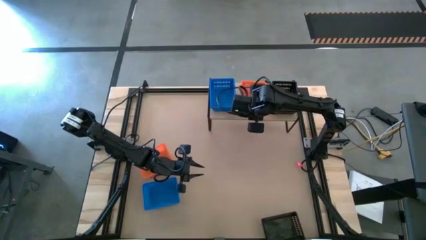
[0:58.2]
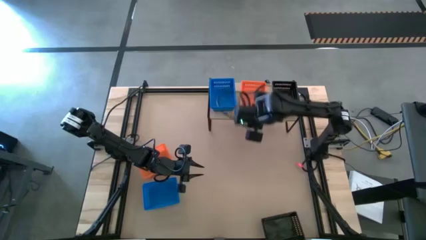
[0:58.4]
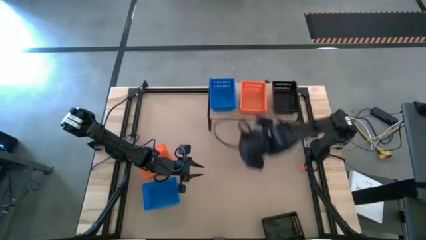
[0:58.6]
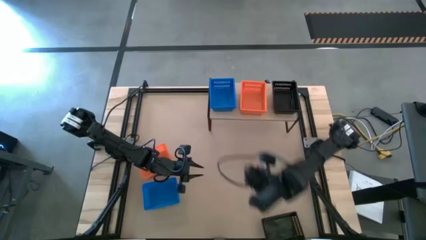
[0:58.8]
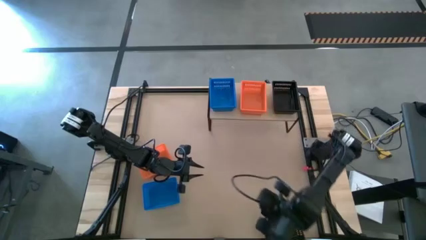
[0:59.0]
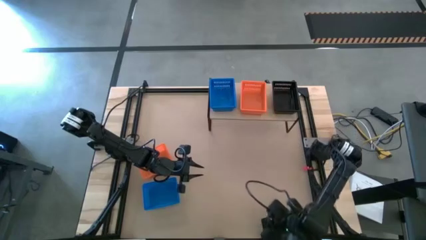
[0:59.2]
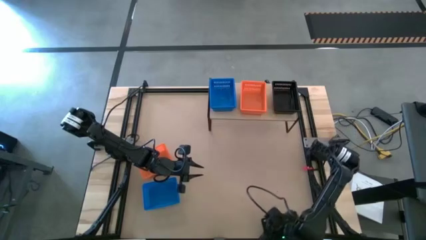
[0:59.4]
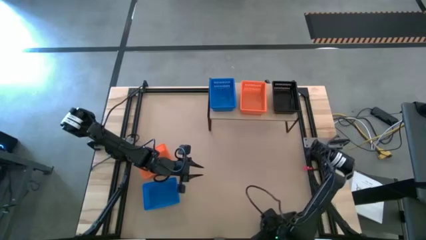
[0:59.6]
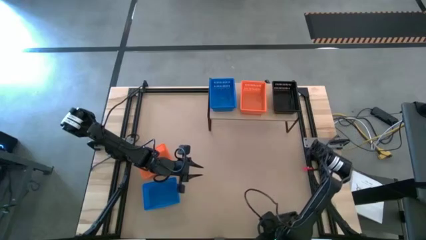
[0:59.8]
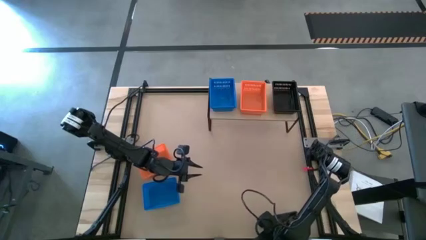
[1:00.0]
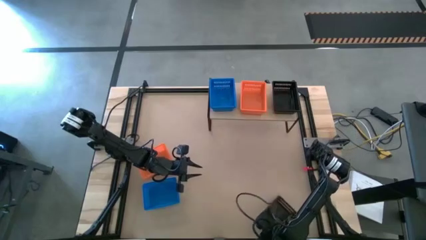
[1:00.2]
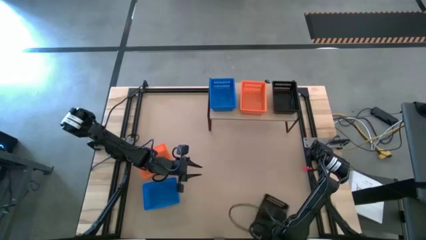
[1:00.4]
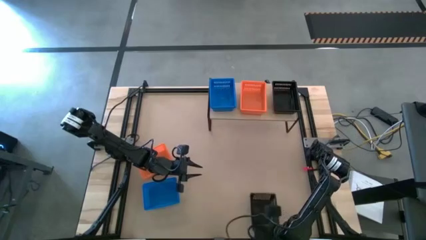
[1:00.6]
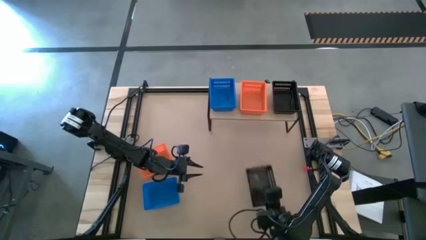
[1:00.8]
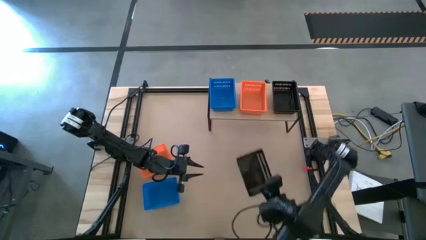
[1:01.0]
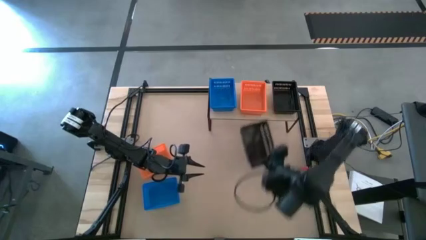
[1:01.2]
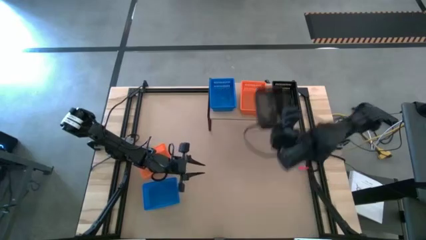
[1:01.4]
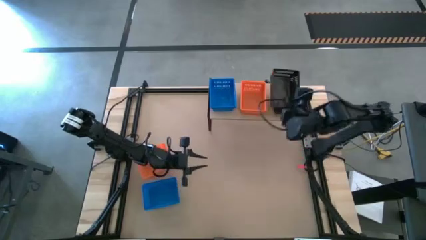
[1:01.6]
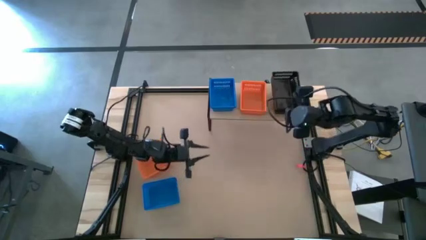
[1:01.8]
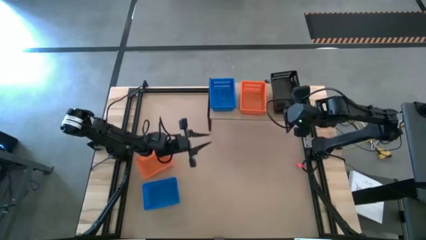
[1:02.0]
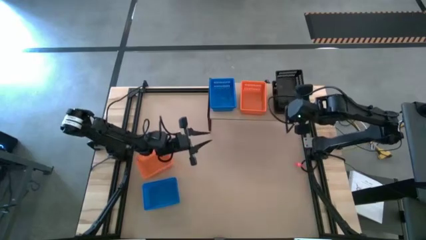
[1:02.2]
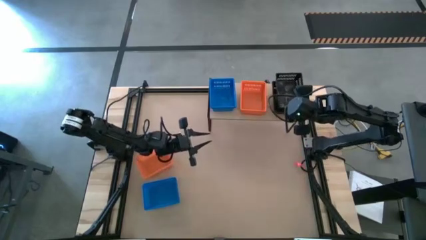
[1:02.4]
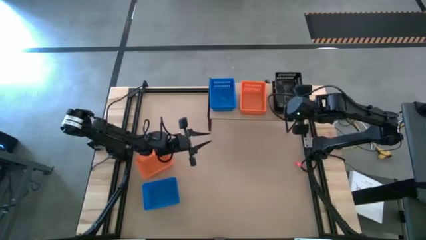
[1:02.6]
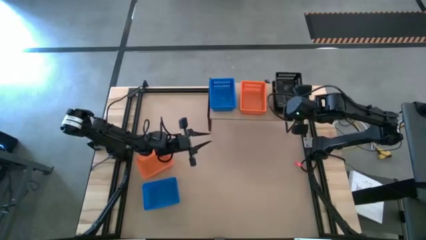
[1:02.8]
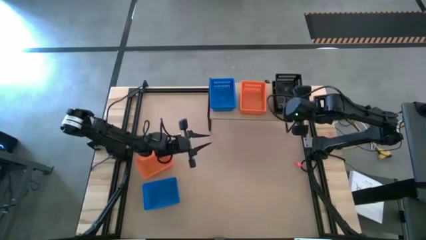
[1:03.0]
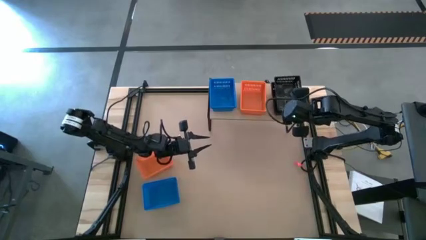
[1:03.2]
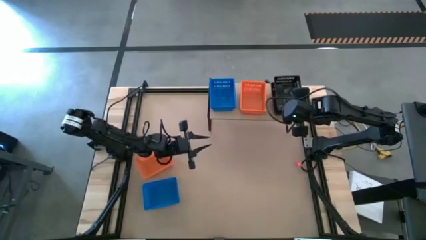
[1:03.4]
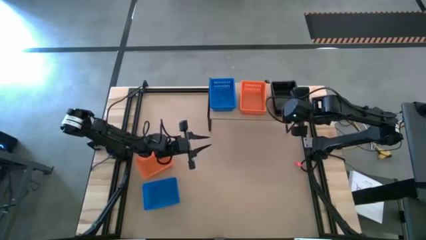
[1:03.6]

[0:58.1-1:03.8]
Task: Stack baskets on shelf by color
Stack the bottom black bin on top of the other black bin on the shelf

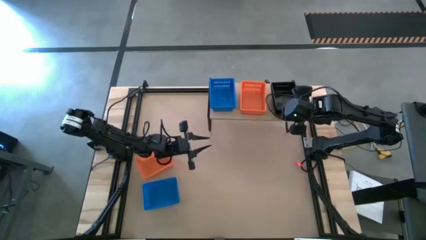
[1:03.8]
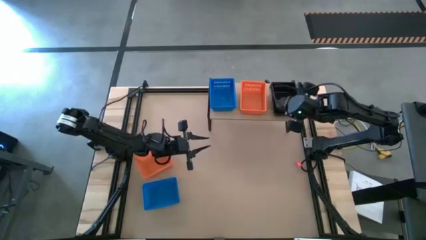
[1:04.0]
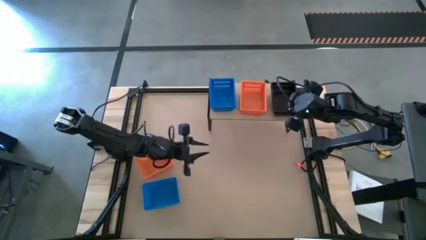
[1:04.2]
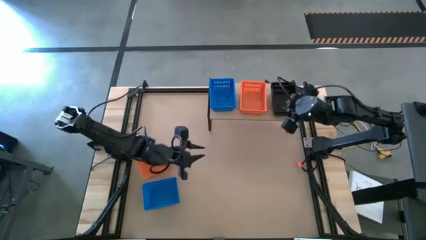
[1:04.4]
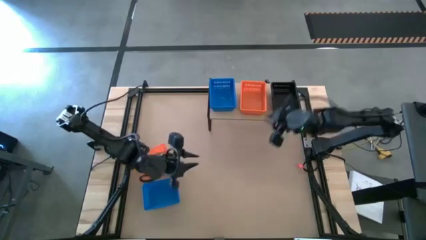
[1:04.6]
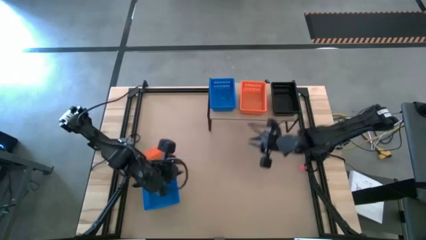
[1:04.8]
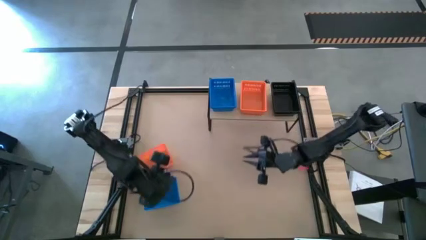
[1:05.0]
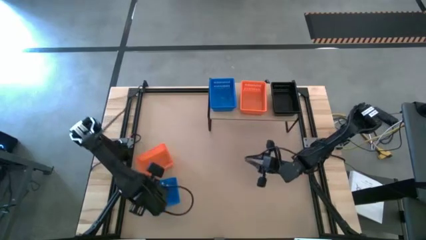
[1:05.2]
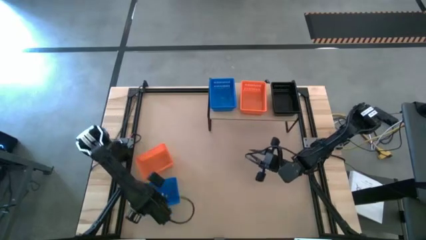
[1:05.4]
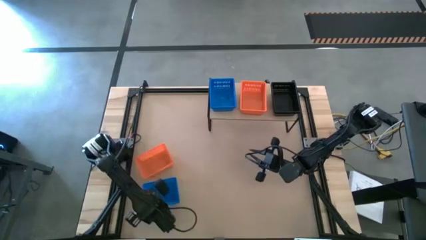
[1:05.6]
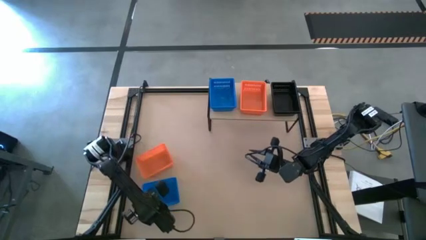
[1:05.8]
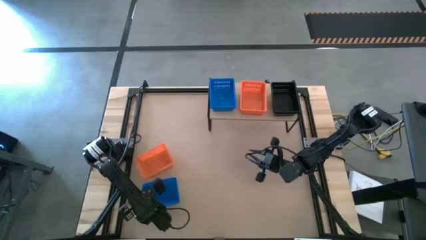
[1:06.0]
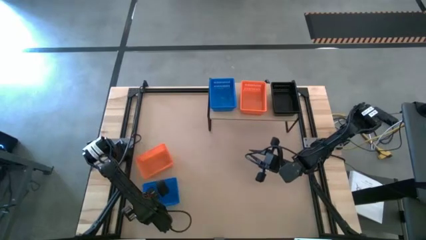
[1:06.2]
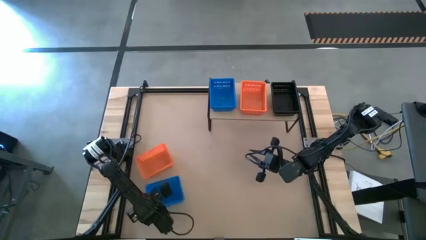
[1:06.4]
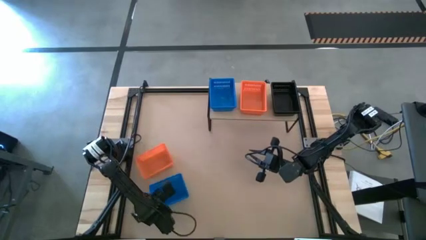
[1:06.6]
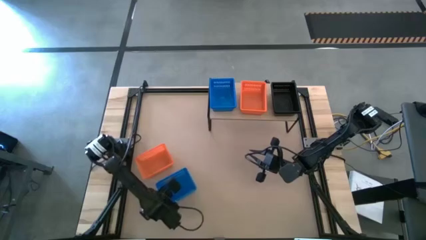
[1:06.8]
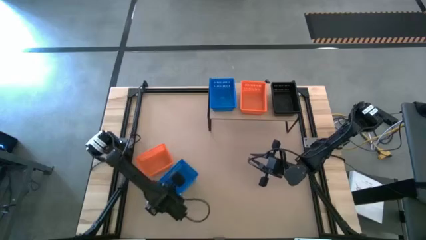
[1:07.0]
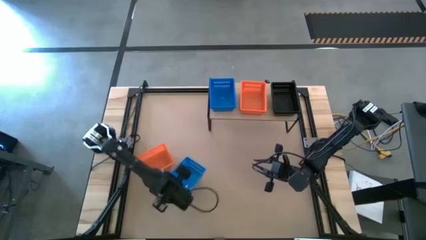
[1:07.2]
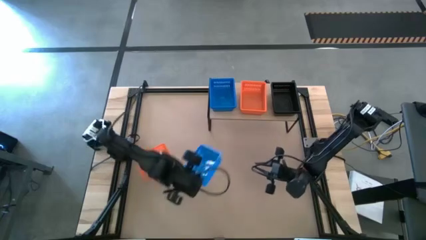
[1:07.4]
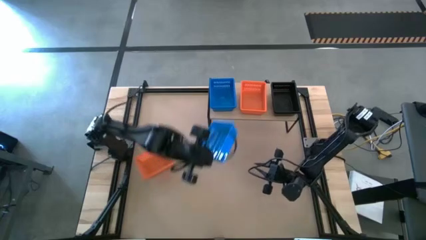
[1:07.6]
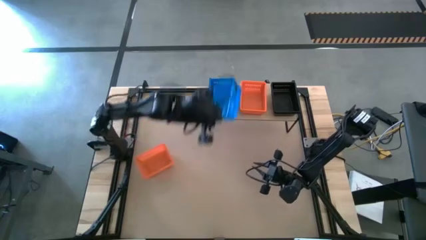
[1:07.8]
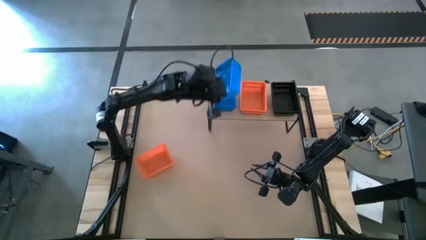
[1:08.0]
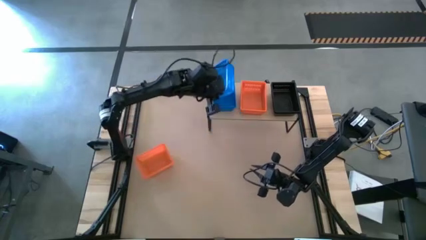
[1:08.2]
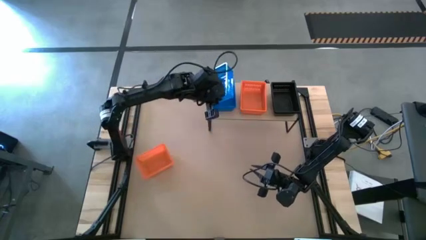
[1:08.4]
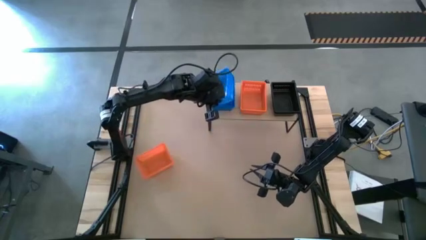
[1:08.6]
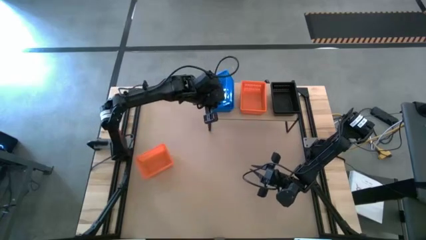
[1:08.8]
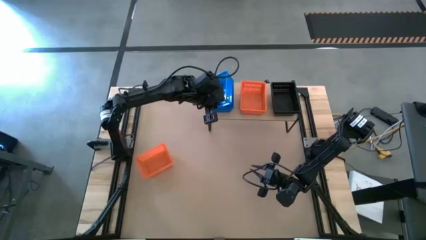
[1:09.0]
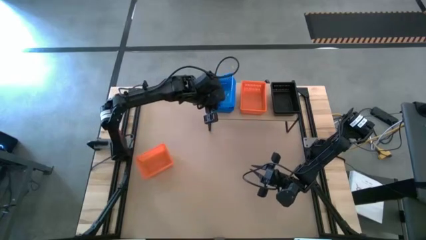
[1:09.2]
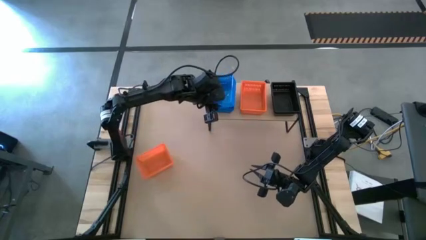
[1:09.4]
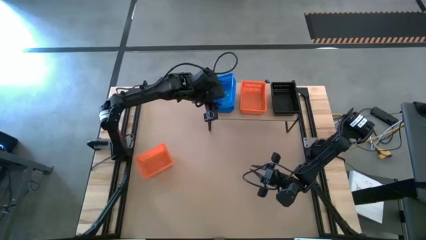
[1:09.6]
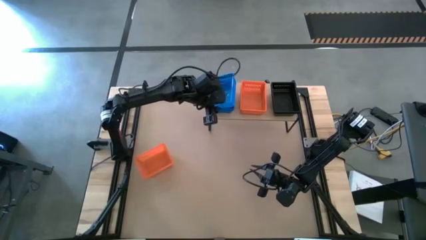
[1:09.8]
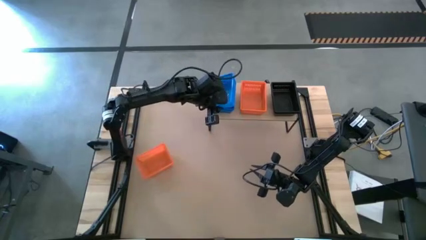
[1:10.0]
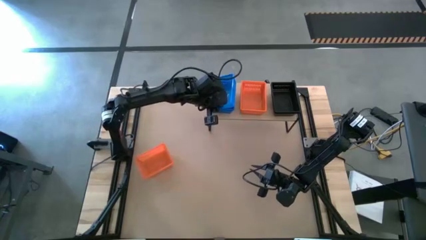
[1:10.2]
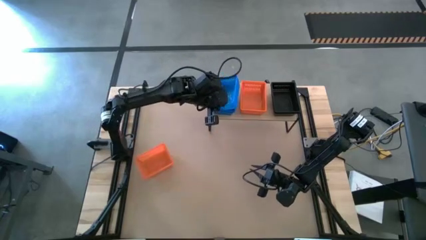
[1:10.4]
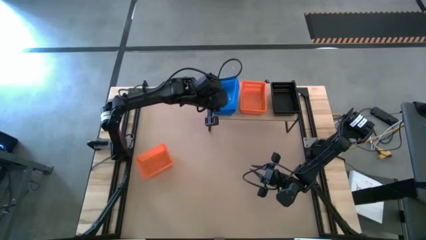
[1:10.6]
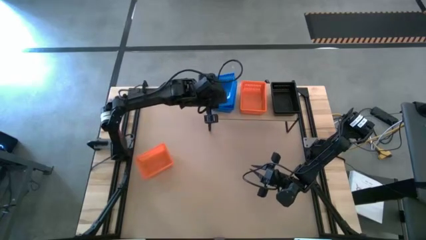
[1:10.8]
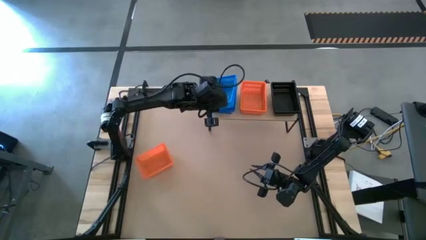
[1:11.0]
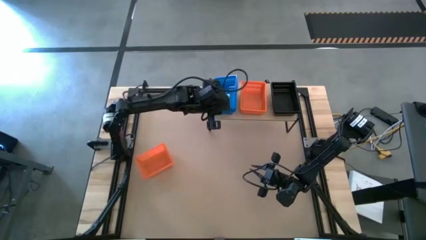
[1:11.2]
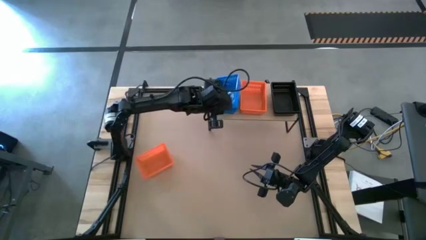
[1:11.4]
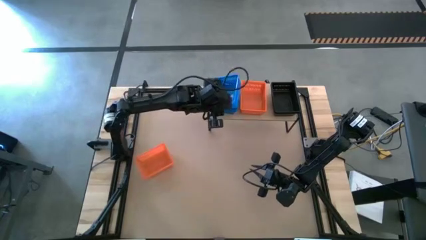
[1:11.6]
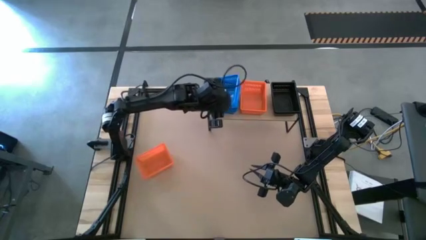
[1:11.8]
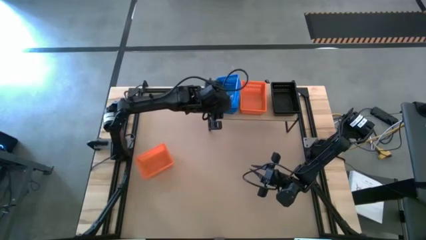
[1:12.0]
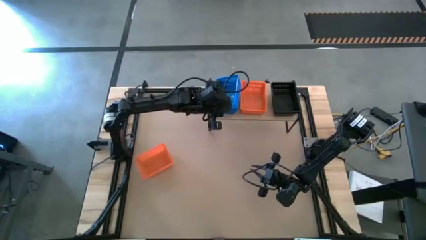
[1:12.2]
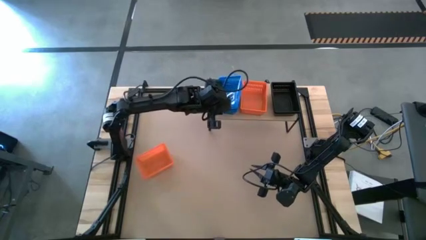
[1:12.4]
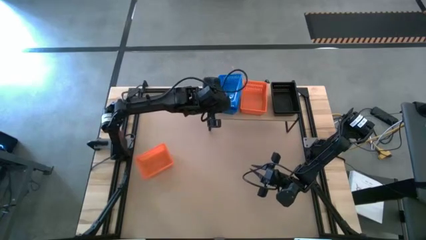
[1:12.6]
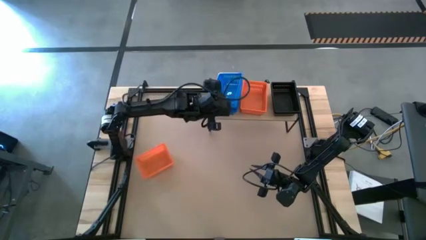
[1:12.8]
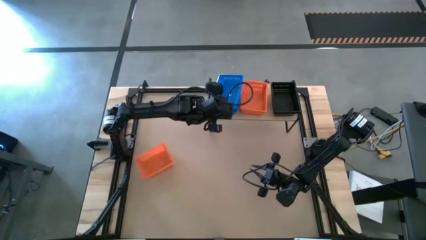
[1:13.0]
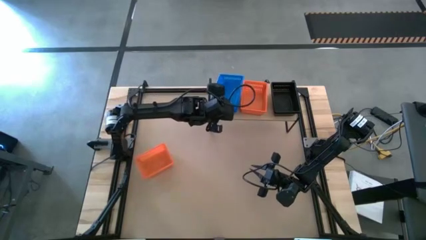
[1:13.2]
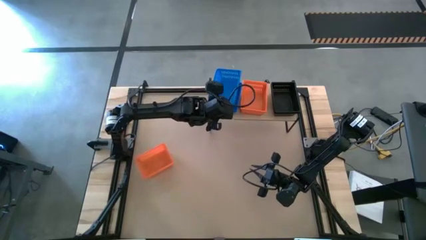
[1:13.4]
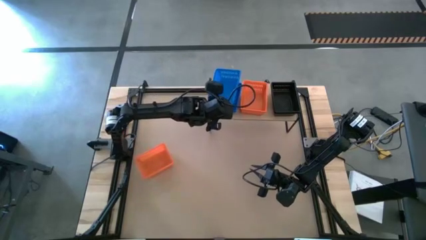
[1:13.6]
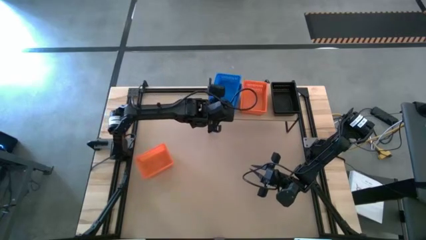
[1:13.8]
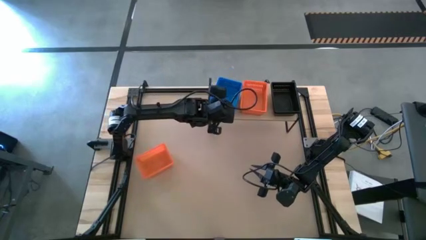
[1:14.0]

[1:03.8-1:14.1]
Stack the blue bin on top of the other blue bin on the shelf

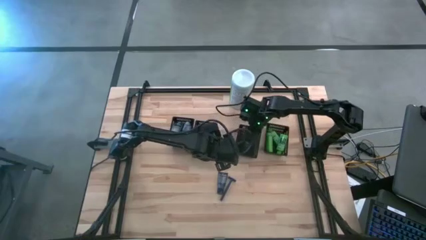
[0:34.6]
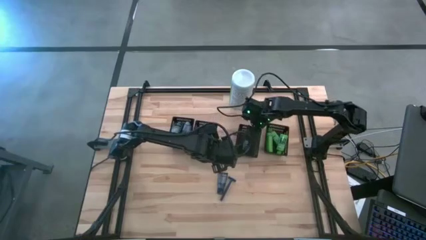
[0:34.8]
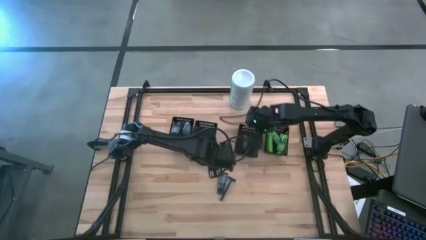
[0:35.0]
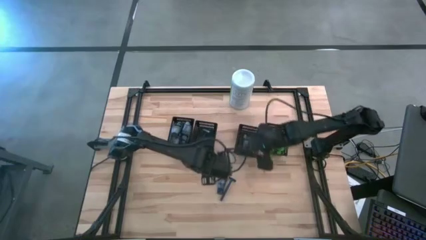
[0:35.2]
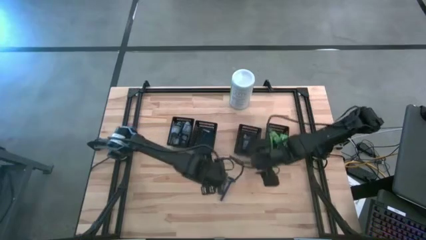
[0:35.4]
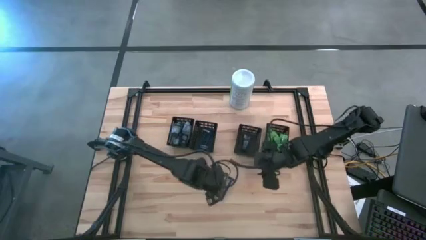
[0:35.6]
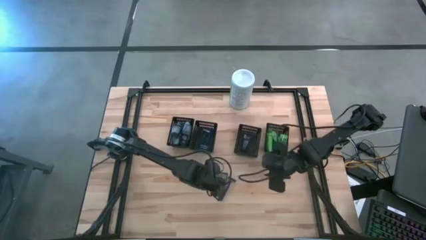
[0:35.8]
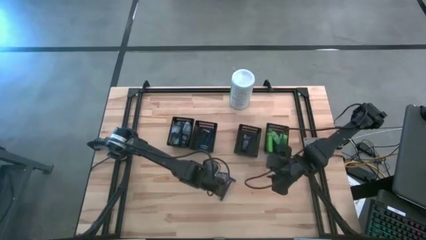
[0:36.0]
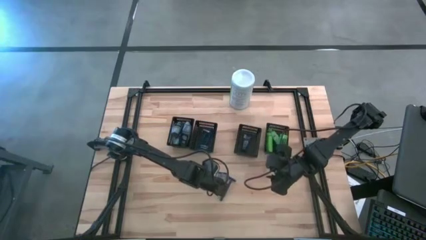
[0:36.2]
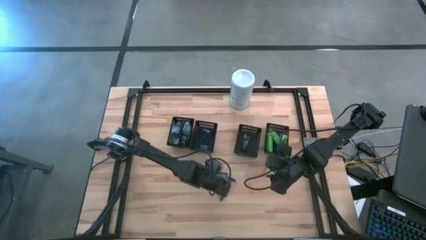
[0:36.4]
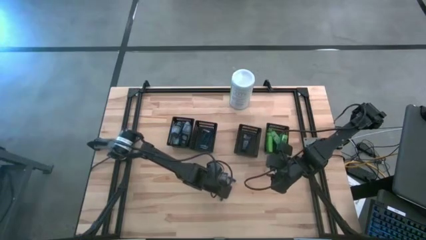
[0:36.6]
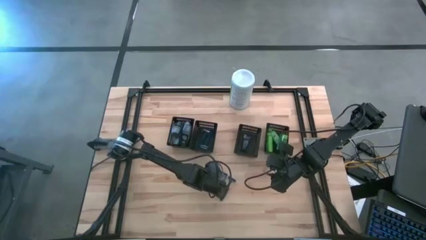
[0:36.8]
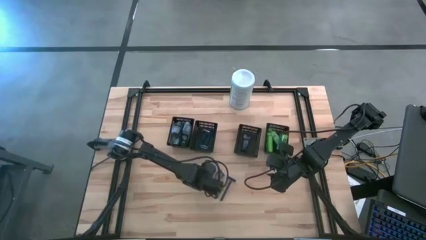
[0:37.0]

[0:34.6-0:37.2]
Task: Pick & Place Travel size toiletries
Adjust the blue shaver cream
